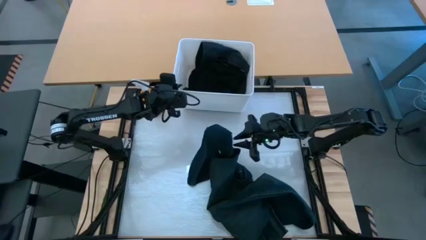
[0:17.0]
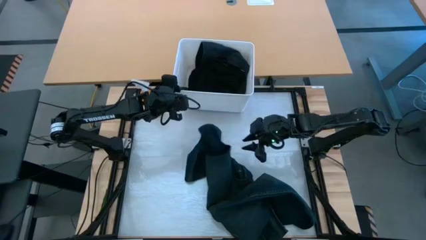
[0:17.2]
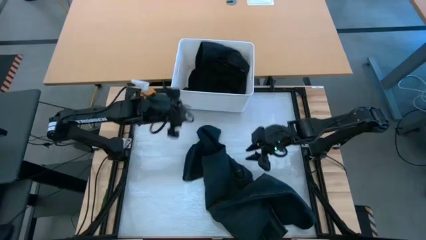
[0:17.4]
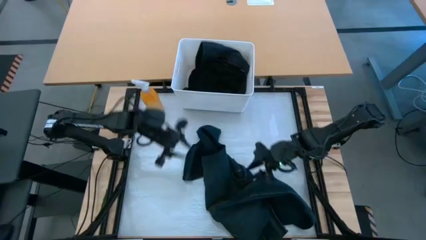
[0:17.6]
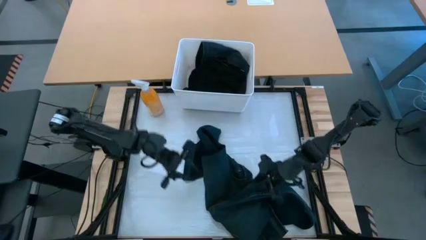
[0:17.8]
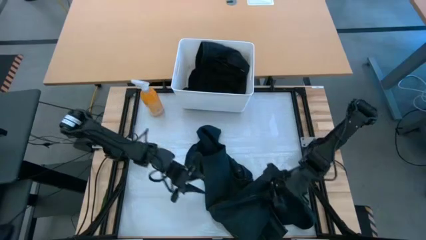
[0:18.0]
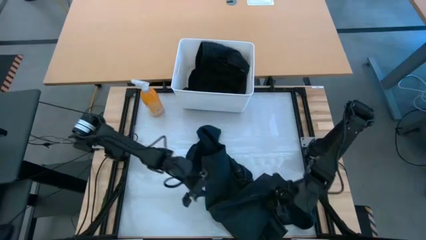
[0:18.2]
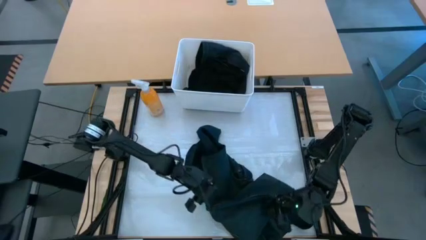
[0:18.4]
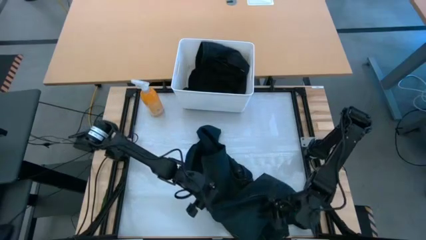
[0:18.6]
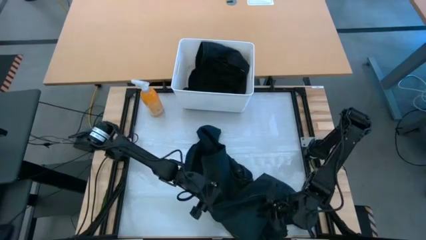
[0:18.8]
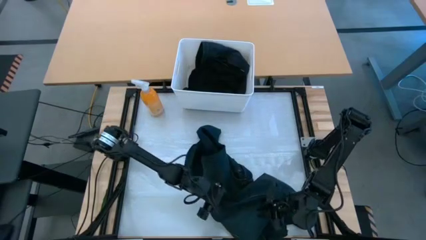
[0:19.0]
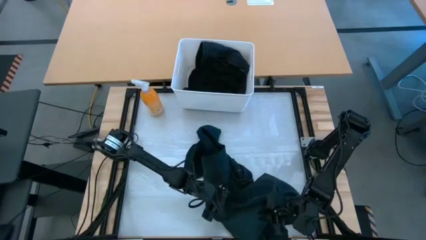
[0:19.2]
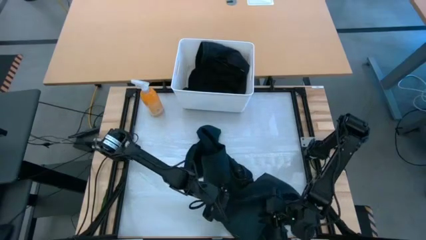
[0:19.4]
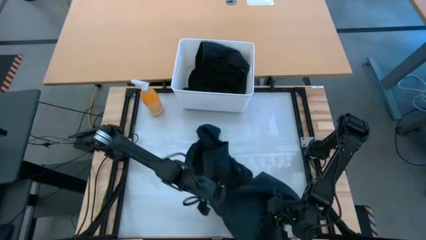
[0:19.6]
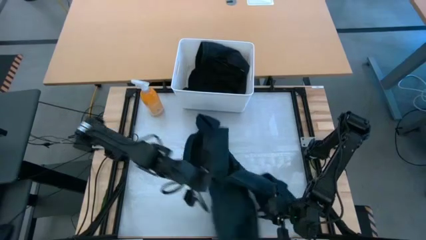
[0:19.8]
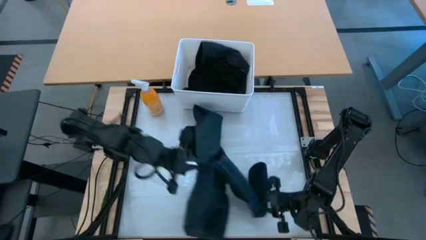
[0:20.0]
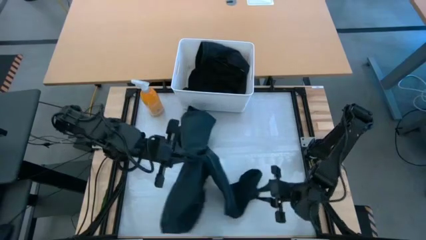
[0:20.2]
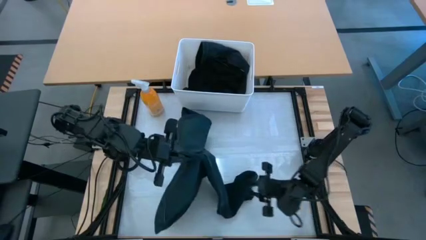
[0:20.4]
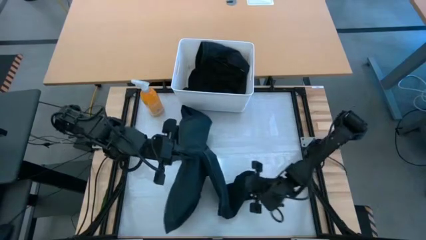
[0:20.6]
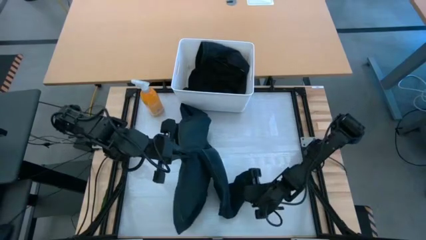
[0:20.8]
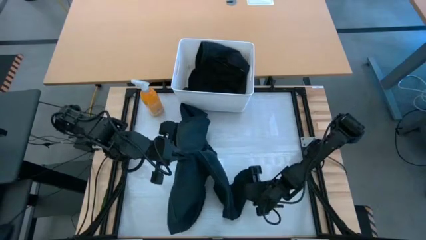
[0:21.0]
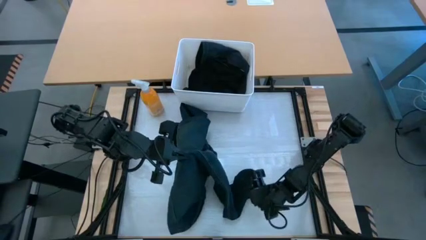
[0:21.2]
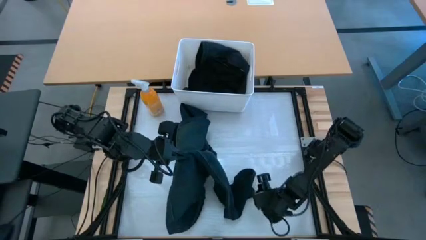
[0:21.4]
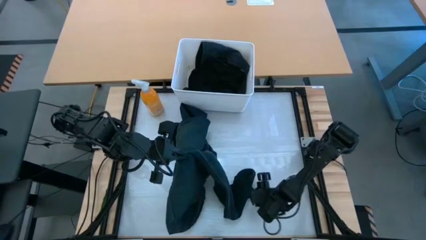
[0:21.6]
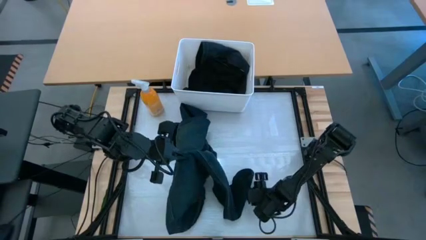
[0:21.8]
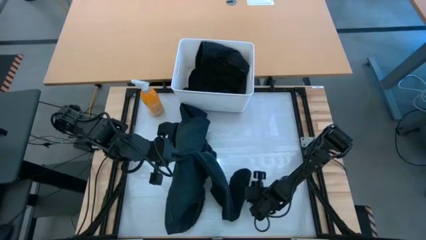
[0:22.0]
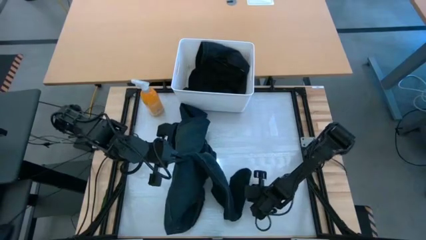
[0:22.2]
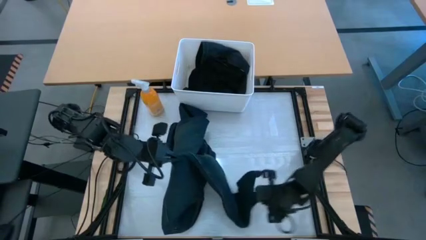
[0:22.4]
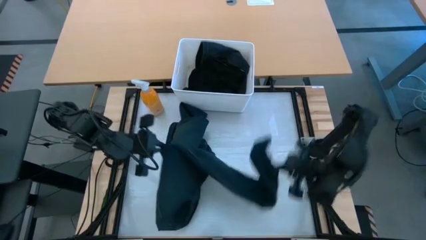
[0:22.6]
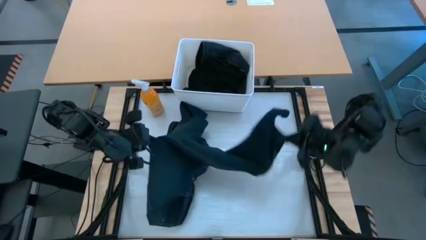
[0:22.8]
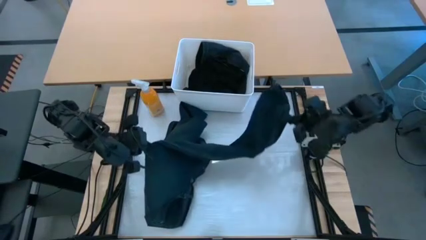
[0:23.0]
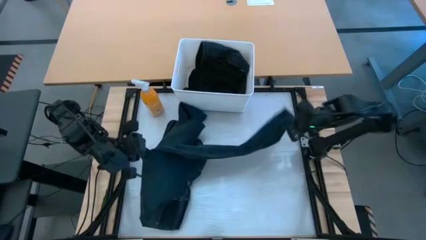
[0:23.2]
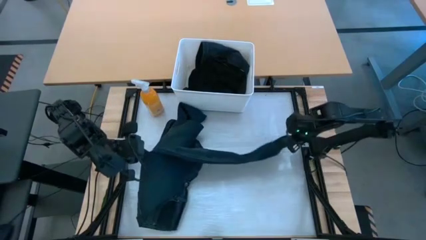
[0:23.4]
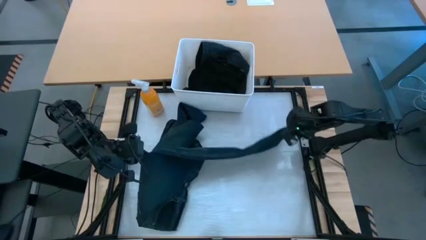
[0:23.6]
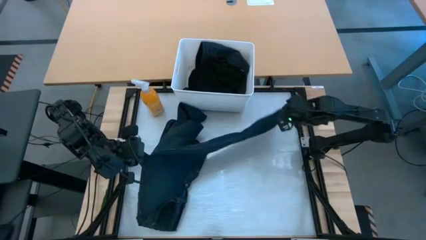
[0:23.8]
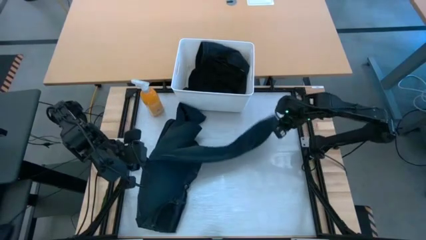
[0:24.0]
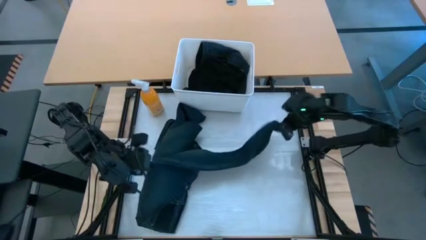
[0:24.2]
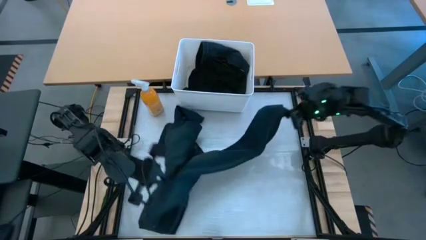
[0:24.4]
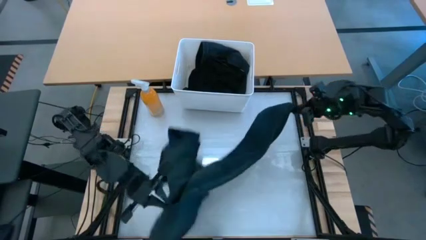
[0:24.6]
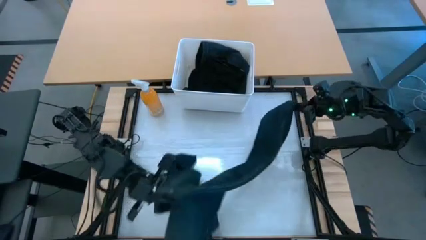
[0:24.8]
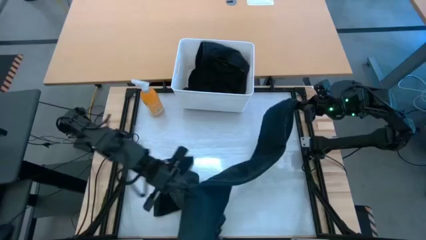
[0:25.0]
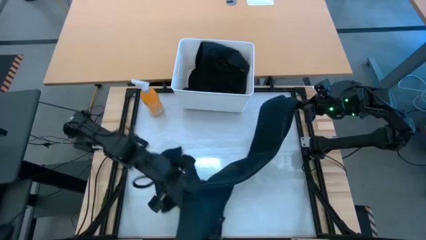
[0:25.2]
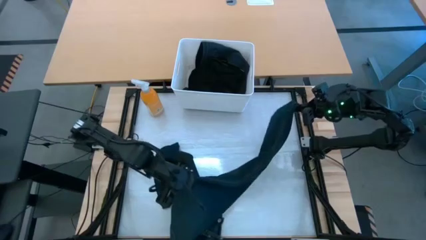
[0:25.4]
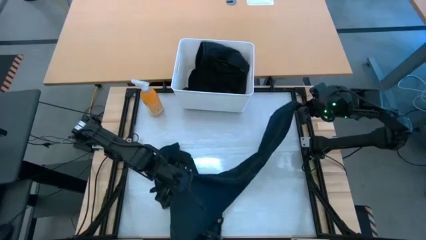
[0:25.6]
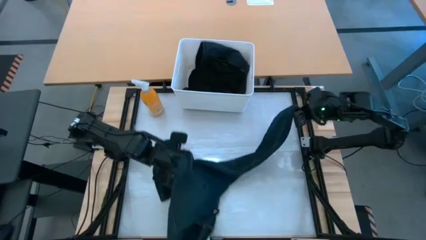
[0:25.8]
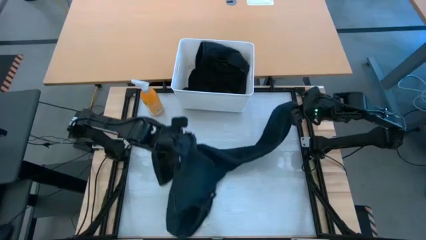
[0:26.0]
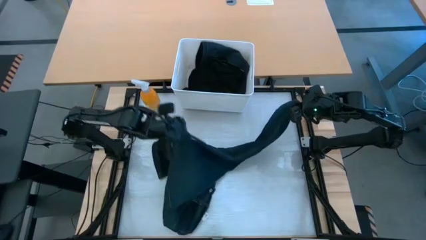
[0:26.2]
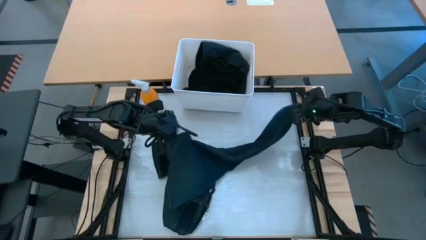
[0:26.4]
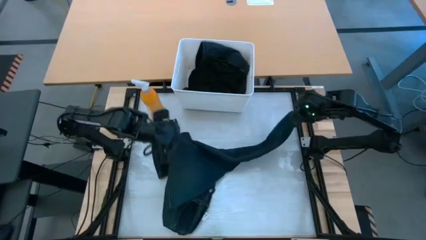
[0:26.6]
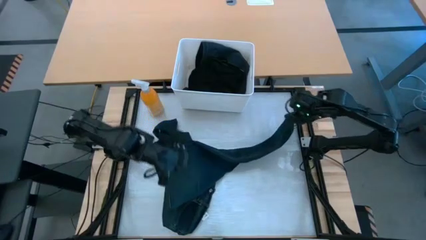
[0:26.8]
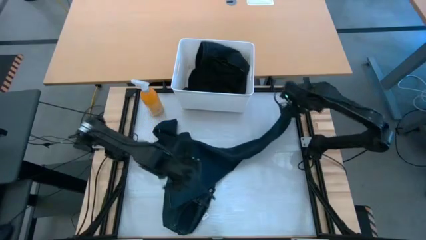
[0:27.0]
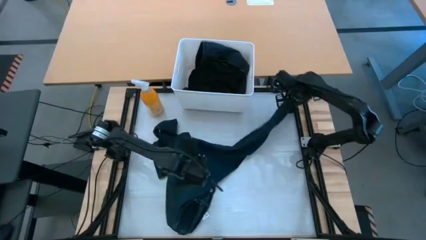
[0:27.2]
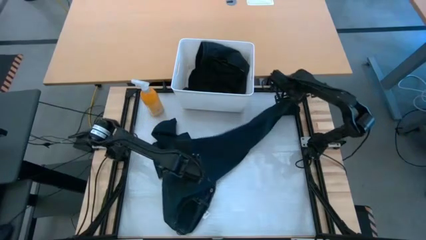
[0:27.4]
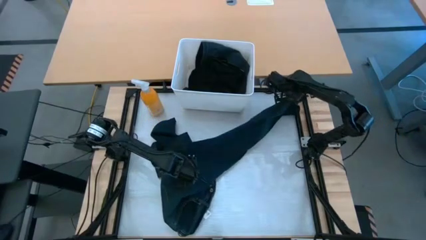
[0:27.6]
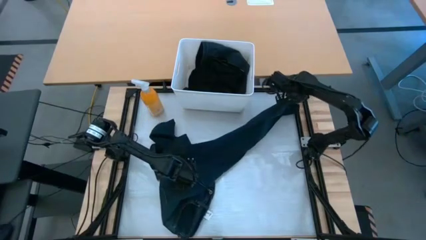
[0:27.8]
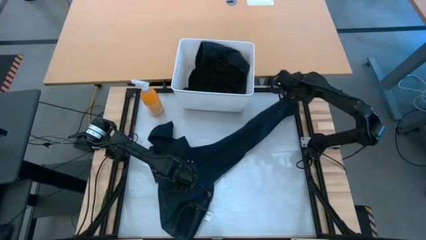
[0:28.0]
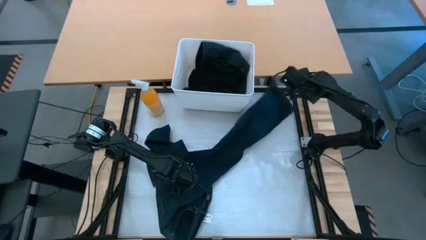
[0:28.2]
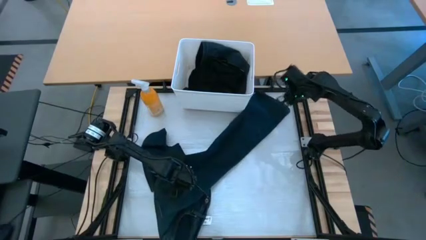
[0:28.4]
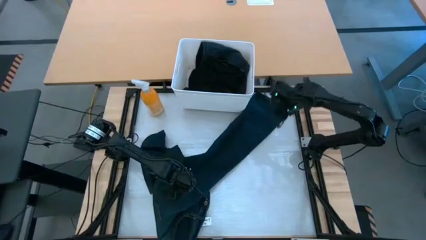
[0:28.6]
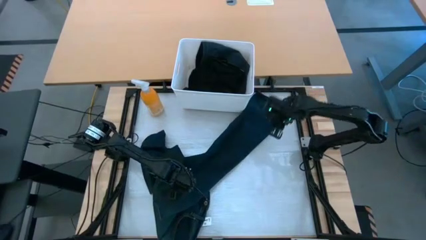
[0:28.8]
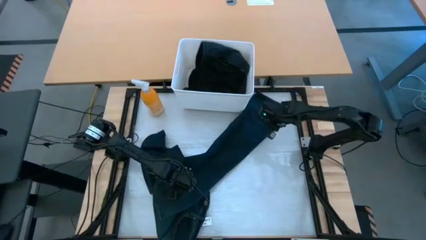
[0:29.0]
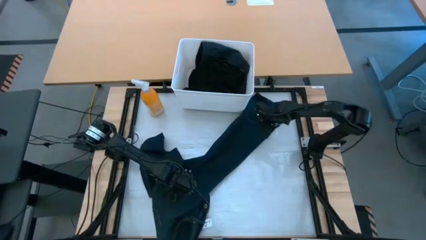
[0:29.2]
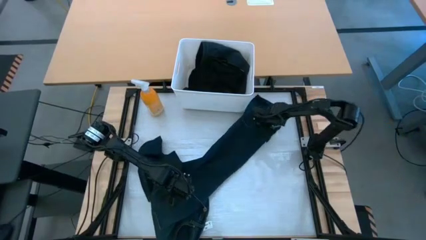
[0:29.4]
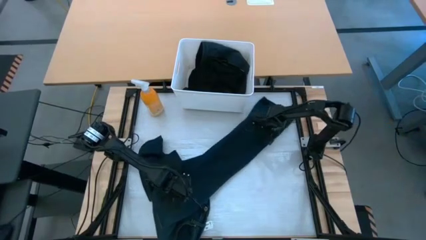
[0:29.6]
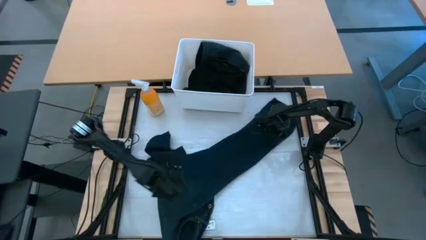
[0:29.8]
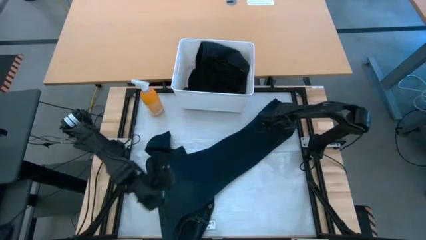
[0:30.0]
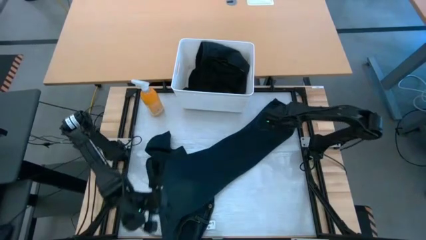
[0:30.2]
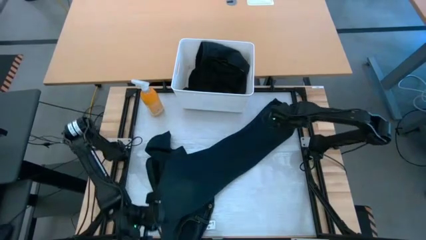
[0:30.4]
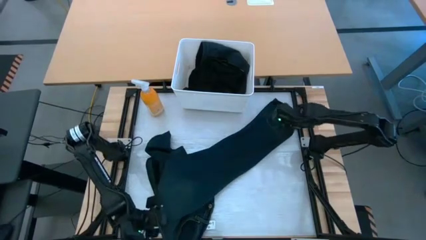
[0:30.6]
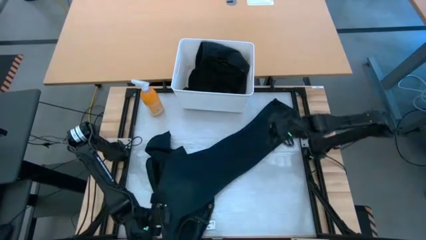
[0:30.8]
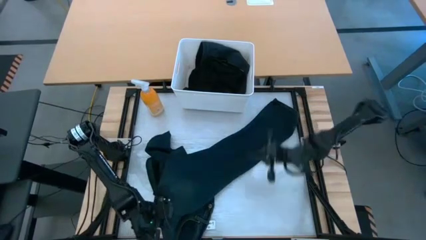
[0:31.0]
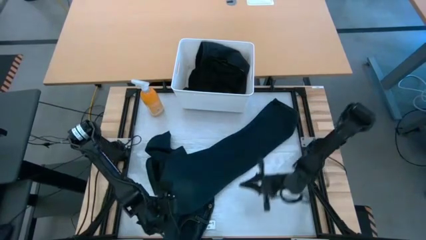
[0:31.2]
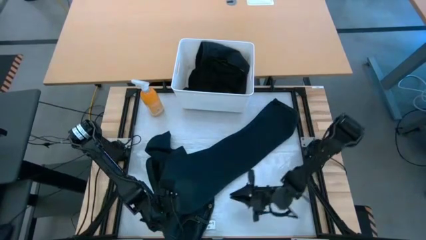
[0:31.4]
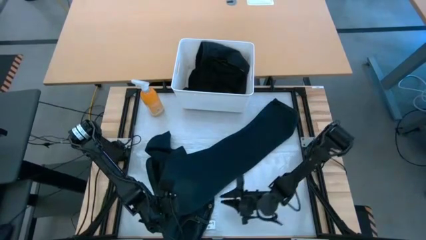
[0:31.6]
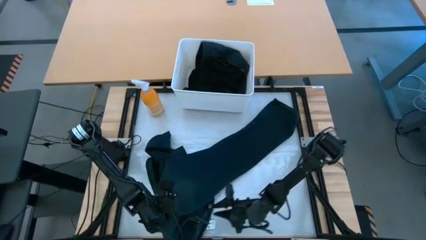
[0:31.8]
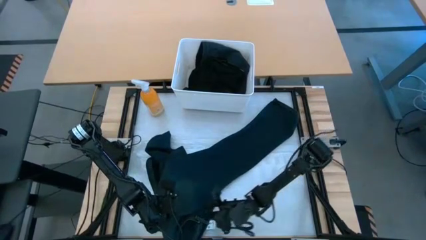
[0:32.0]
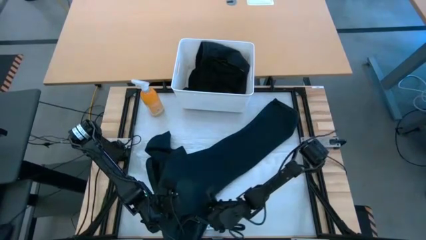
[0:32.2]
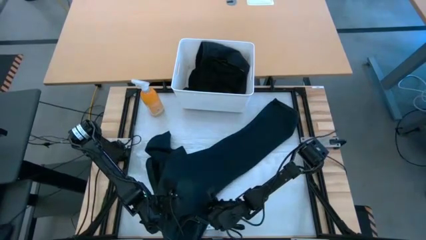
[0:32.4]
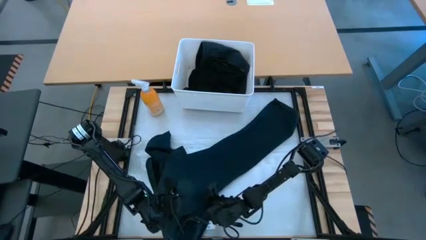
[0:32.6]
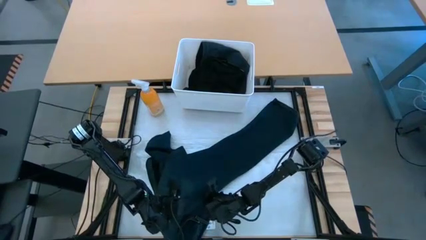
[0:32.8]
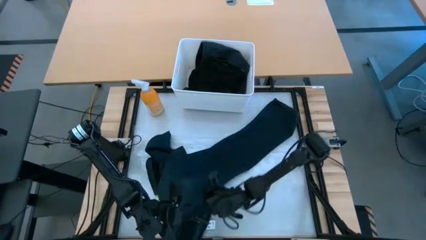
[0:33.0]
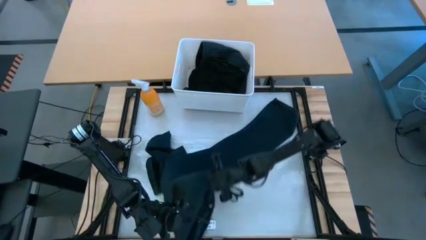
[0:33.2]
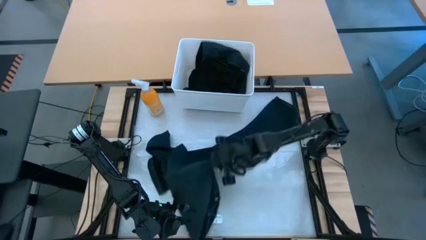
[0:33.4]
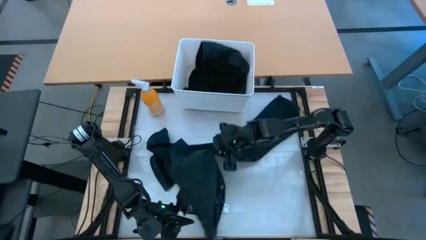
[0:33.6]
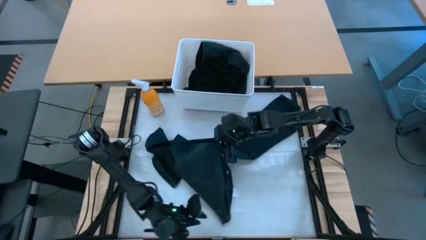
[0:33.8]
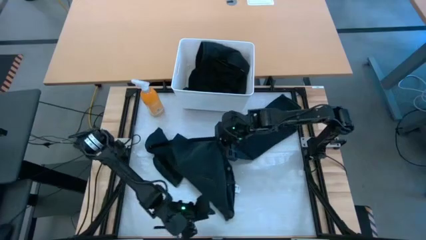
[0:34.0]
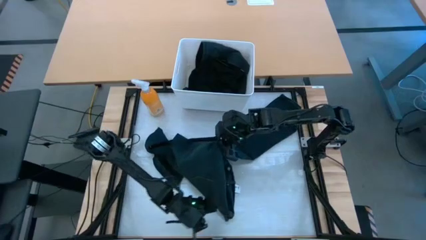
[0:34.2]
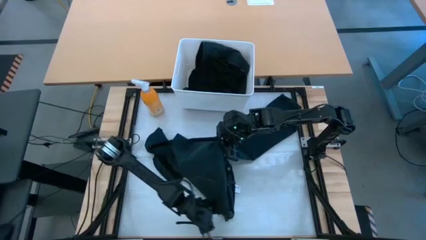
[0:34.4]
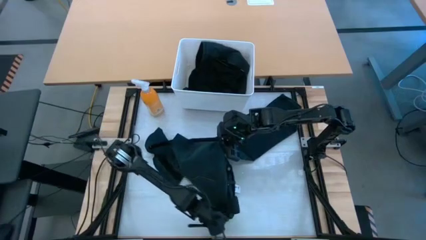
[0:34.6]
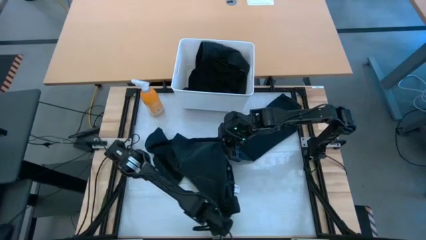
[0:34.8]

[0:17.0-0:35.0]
Task: Fold laundry
Fold the blue long pants
